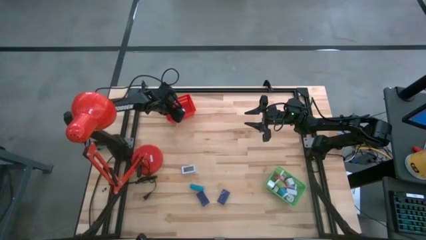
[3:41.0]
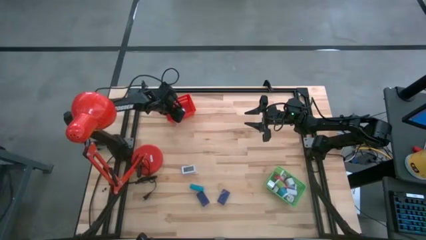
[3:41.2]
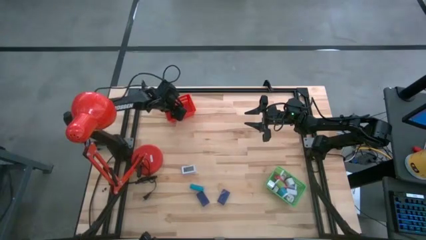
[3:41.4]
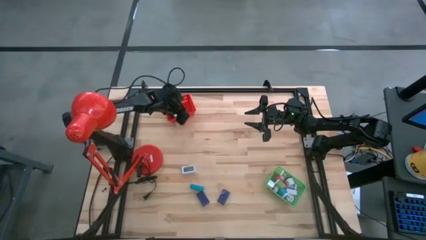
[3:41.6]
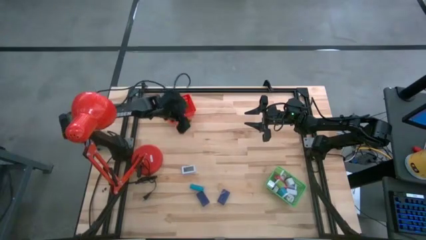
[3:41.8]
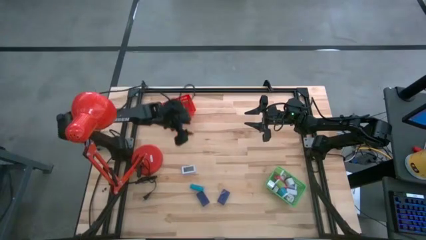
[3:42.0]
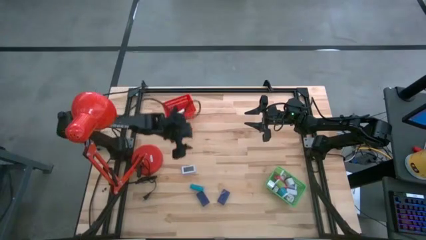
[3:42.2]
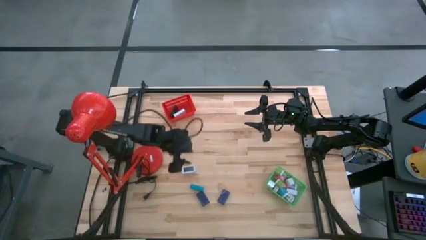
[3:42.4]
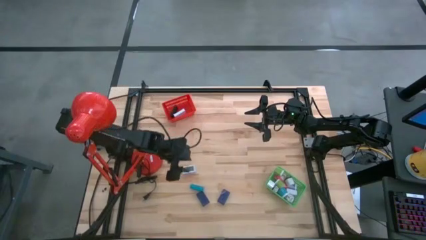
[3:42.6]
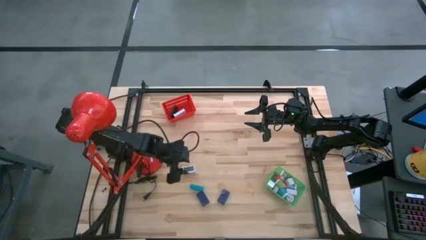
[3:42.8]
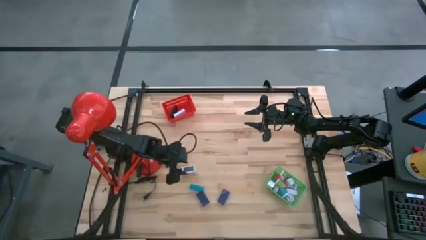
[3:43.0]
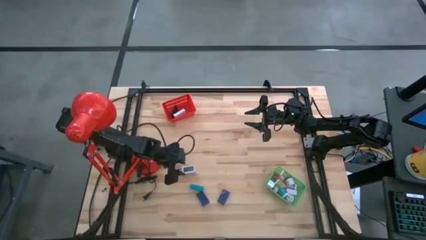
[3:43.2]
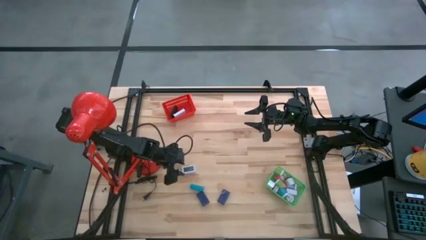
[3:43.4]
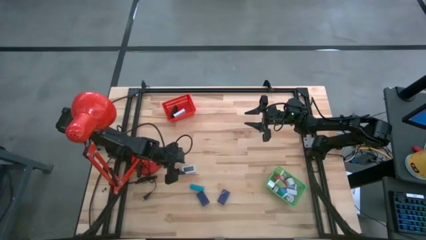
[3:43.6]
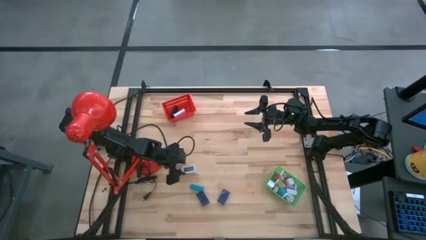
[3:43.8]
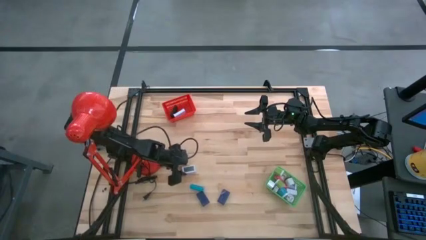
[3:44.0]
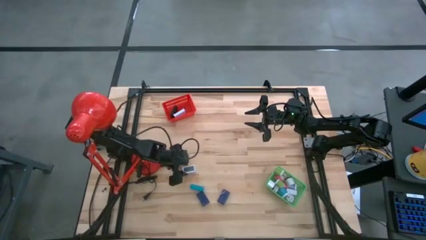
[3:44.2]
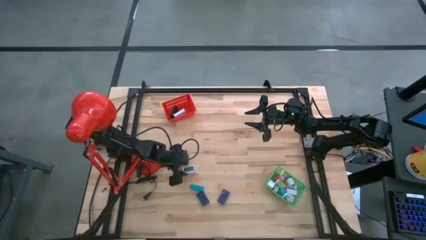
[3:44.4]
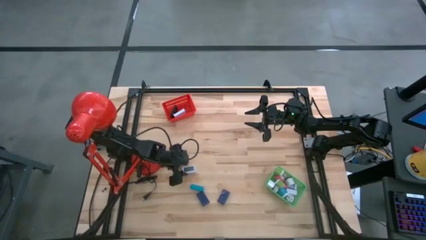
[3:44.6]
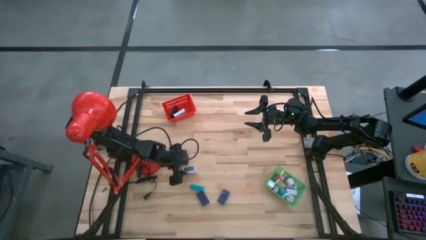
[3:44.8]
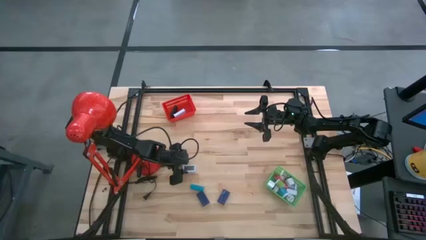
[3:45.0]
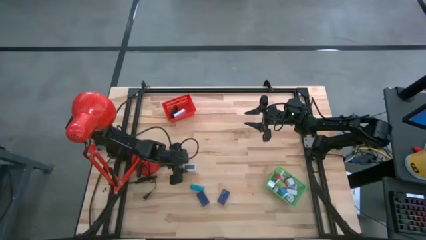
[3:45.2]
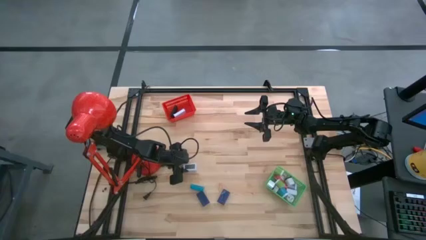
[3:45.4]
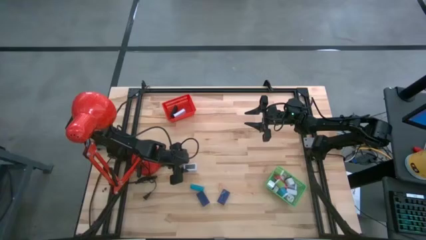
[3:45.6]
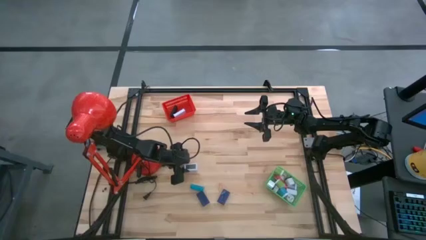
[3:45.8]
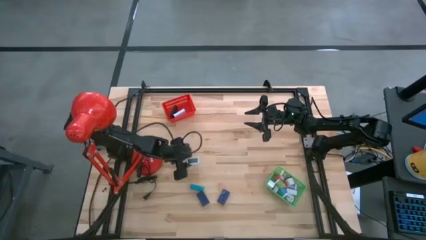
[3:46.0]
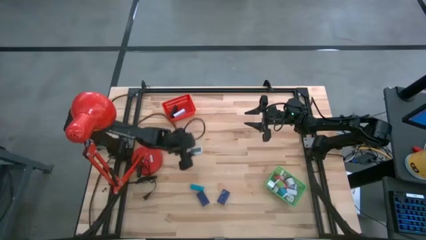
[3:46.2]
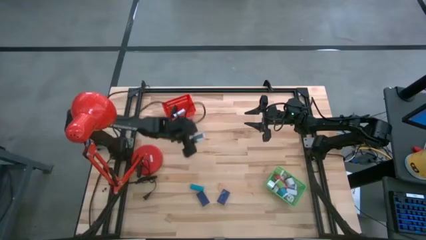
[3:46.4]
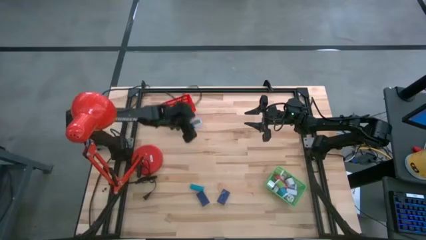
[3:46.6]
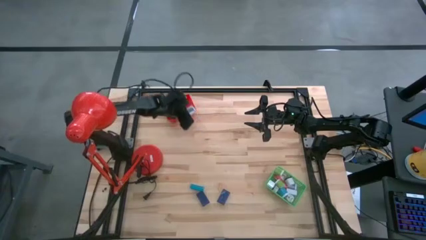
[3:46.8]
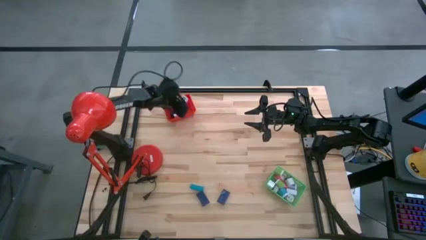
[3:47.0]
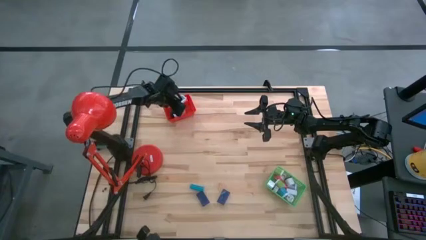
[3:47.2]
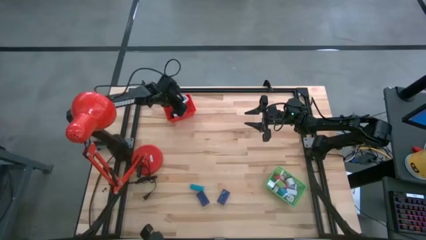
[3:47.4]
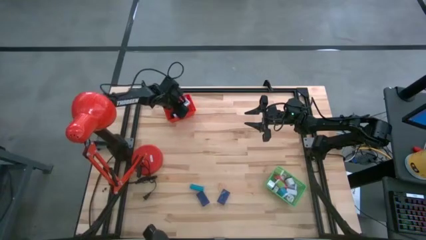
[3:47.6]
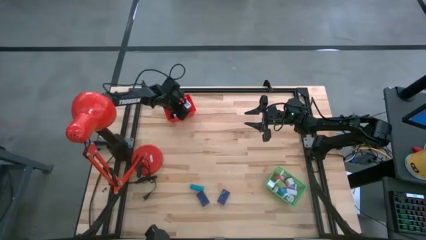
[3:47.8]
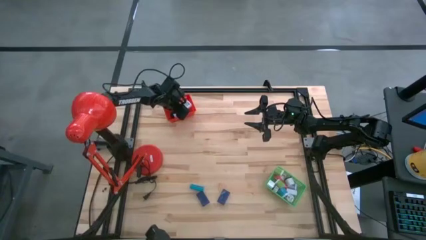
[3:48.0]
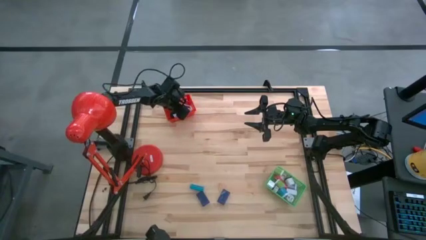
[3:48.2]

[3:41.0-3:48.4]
Task: Pick & Place Office items
Put the white digital clock into the red bin

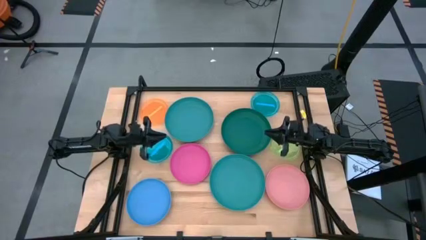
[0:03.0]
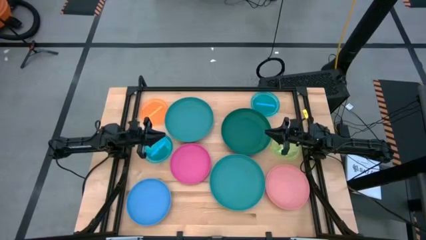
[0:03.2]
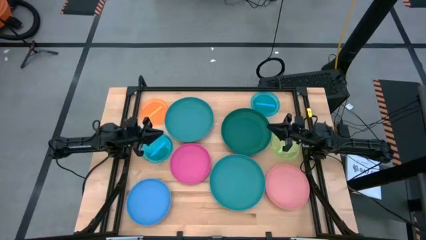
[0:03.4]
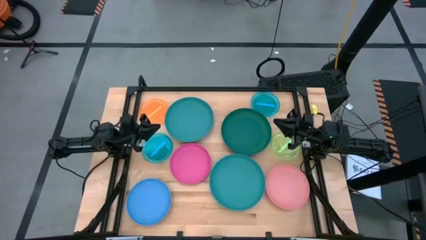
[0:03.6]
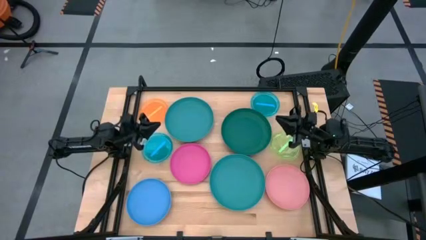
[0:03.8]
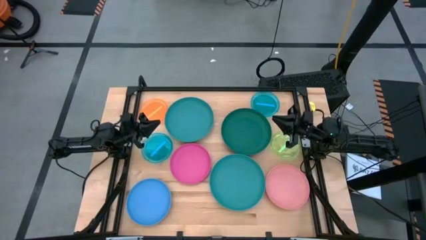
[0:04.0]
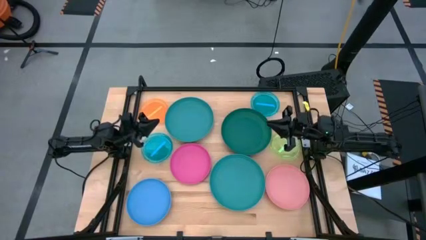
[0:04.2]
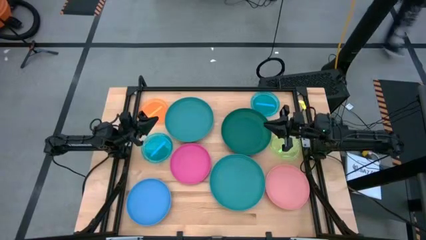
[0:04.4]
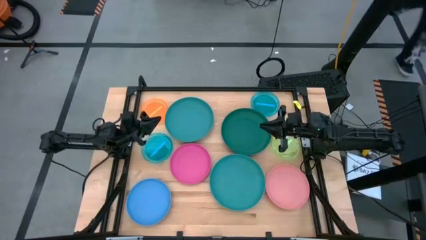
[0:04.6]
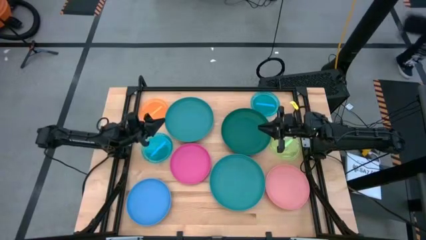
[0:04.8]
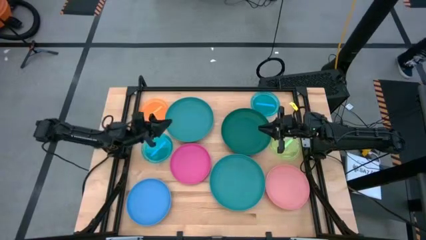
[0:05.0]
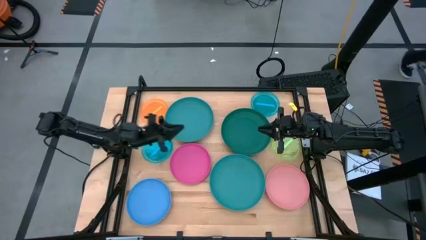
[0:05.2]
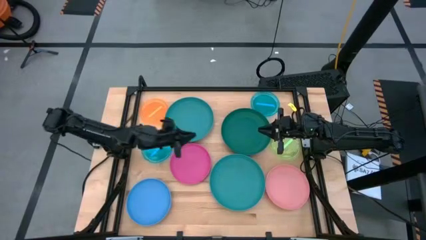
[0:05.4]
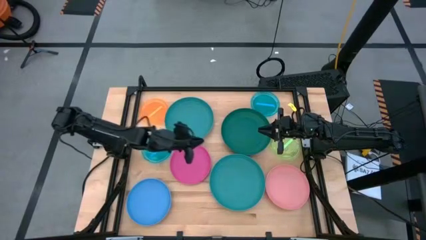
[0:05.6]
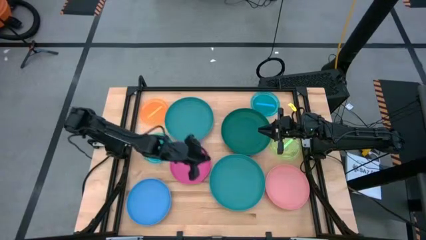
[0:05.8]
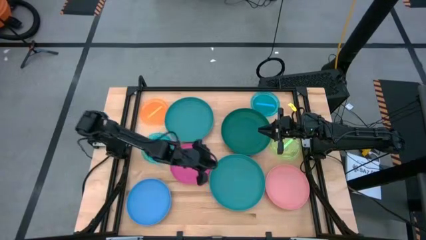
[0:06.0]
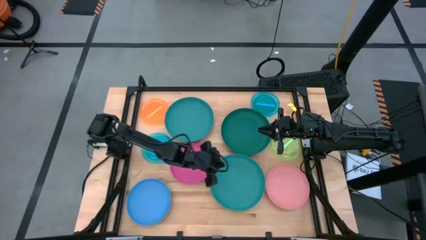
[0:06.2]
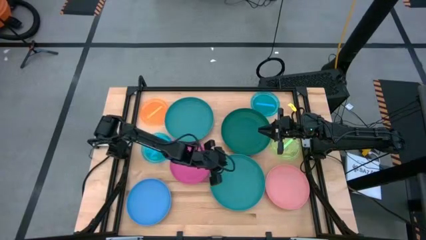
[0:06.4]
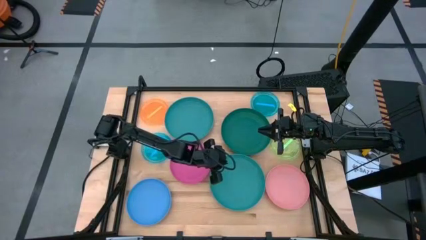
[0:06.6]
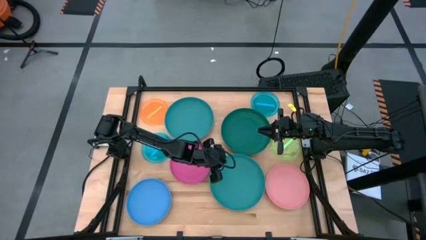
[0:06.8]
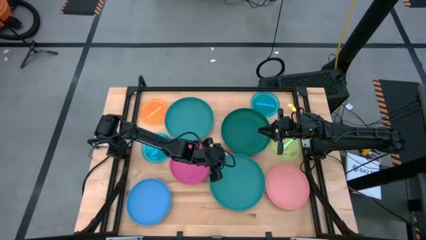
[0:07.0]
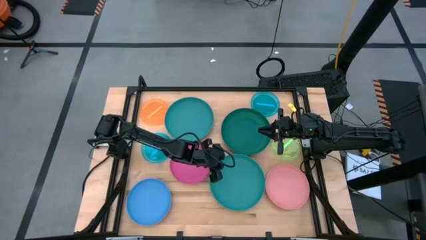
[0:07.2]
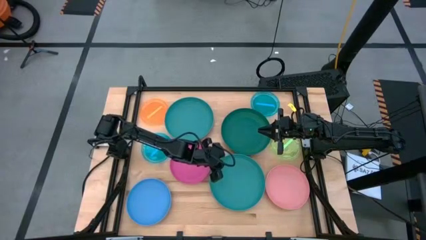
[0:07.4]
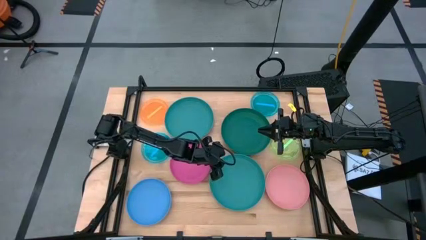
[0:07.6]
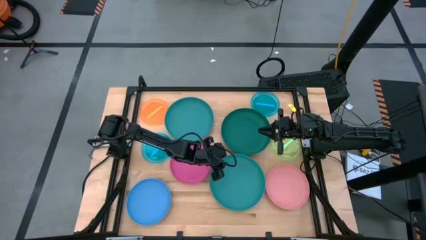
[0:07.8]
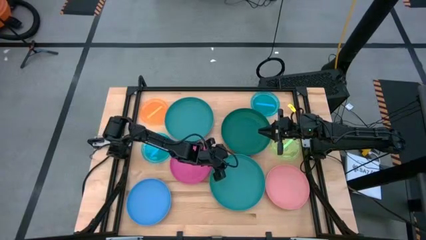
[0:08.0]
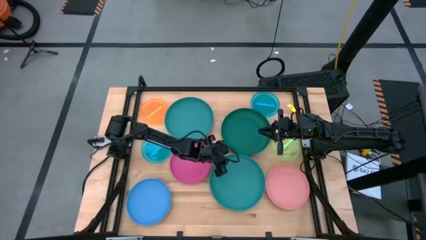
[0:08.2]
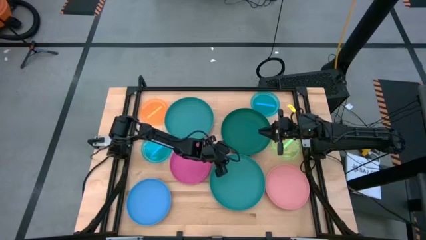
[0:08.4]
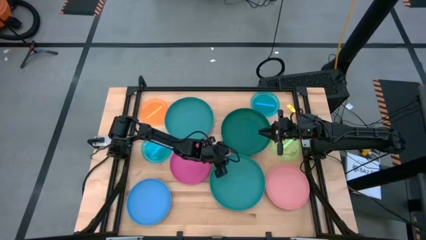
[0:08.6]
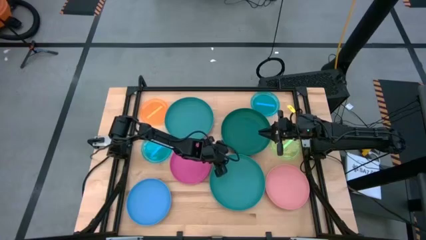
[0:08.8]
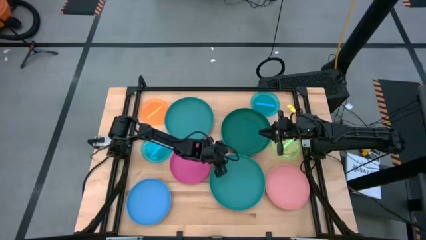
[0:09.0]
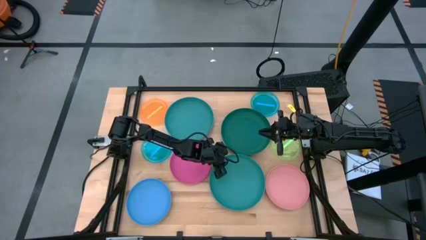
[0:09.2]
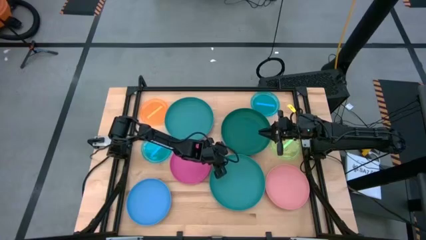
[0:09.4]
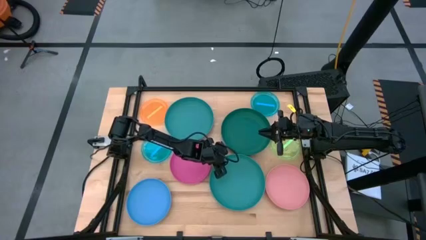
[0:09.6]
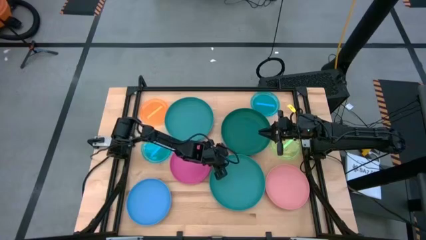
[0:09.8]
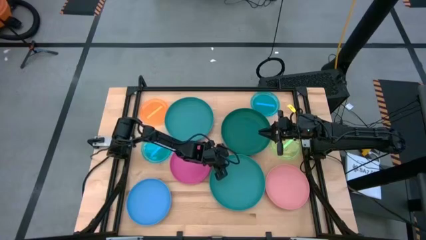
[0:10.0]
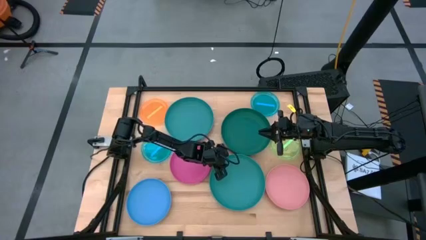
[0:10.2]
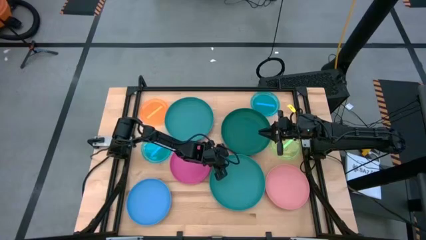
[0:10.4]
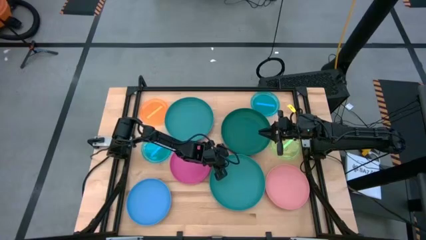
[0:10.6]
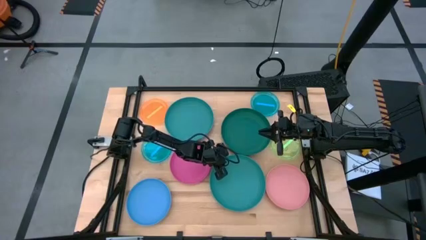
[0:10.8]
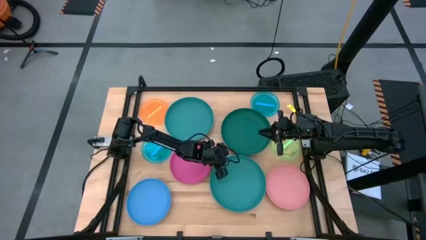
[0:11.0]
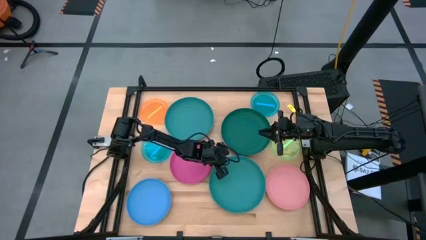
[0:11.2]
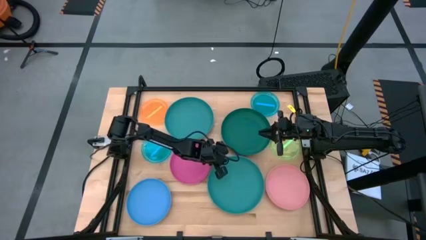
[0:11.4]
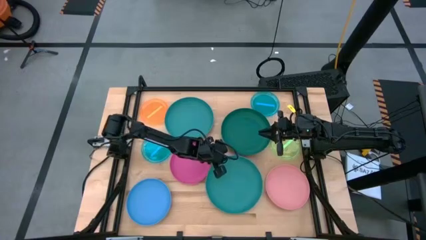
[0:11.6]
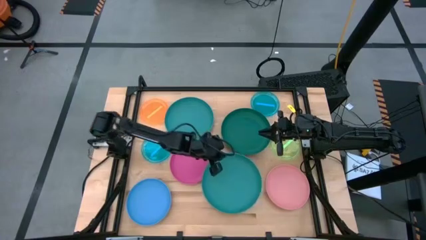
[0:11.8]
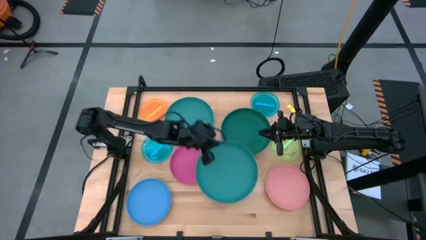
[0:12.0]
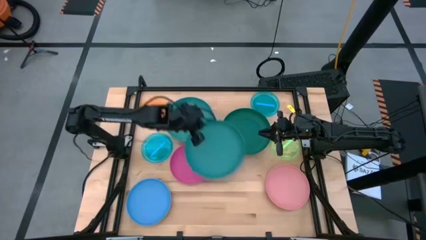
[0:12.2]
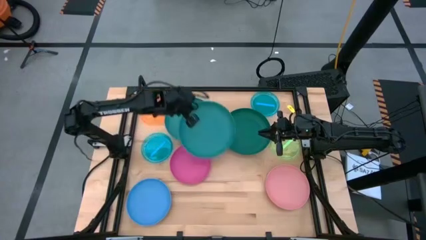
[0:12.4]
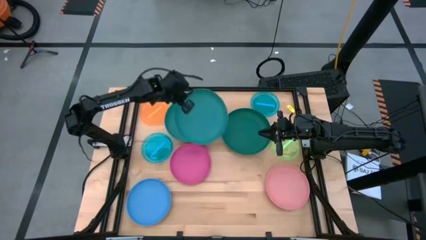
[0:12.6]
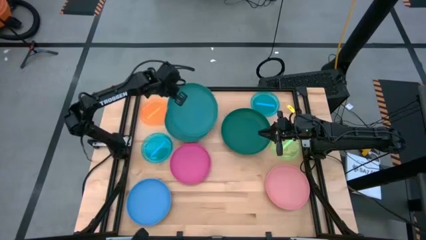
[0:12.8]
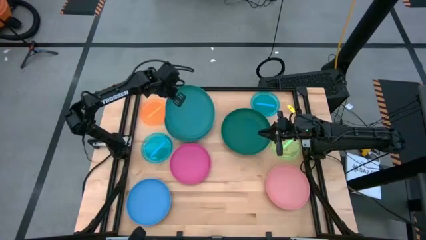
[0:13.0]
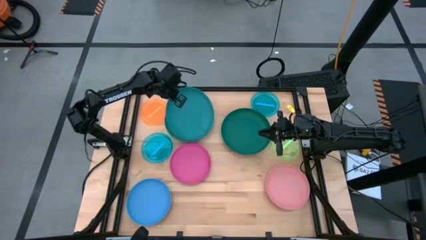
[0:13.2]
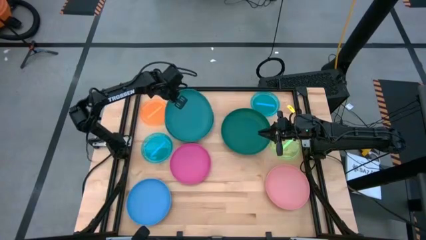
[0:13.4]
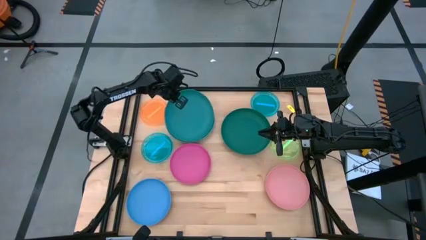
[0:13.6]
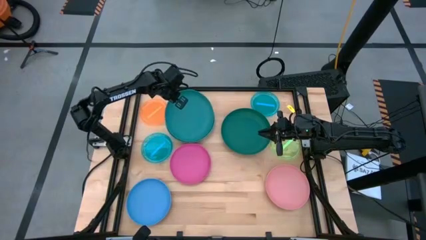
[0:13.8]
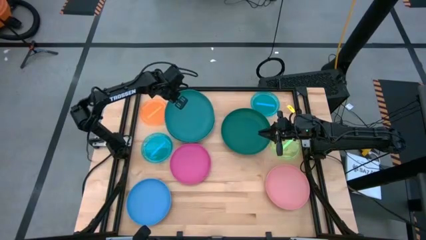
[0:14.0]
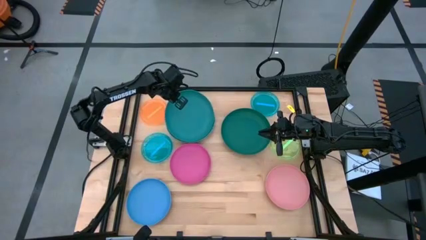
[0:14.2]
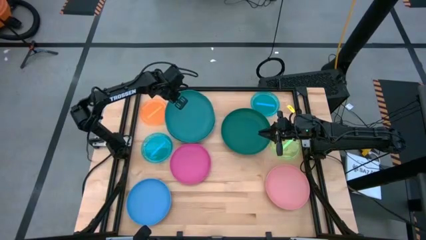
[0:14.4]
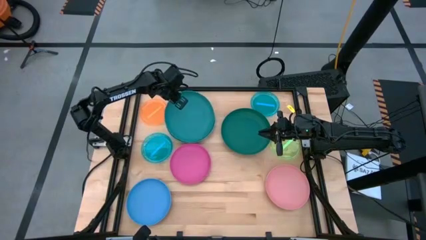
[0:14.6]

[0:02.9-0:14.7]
Task: Stack plastic plates
Stack the bottom big blue plate on top of the top big blue plate
